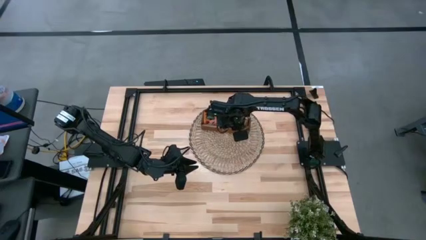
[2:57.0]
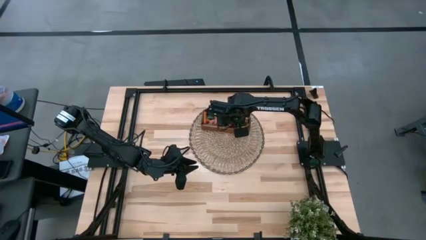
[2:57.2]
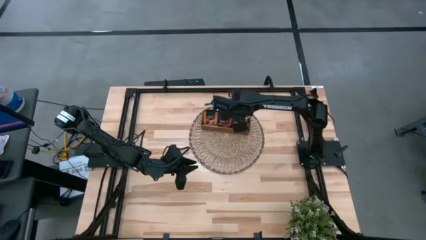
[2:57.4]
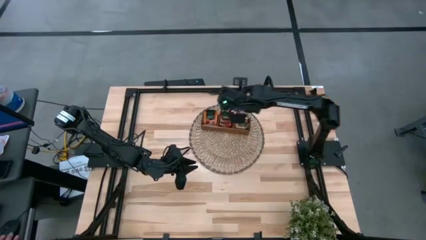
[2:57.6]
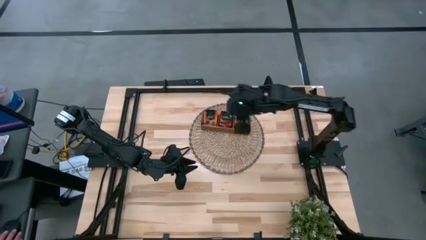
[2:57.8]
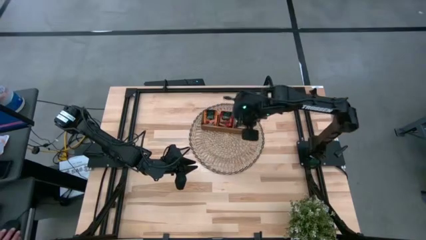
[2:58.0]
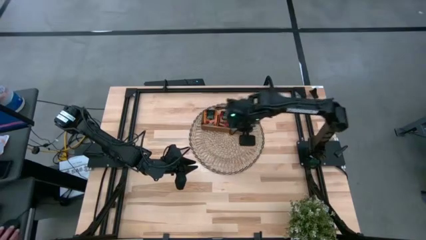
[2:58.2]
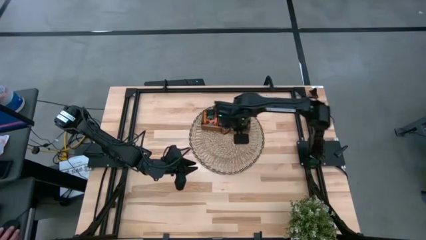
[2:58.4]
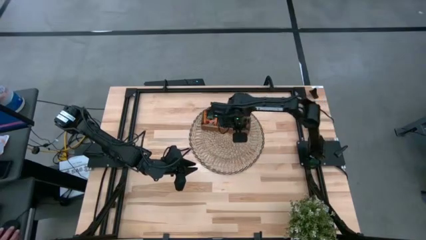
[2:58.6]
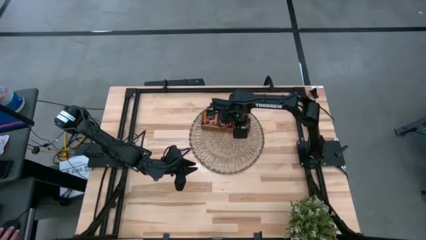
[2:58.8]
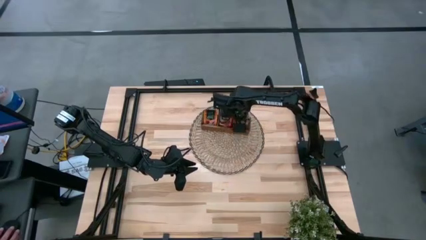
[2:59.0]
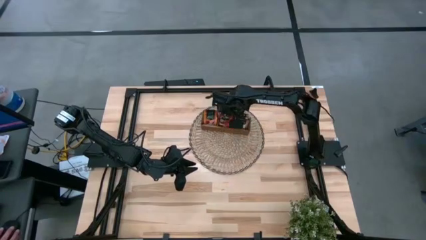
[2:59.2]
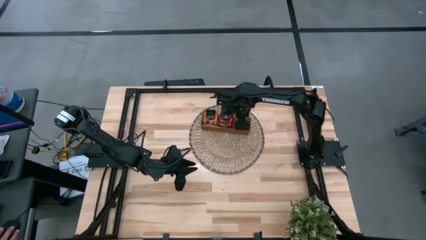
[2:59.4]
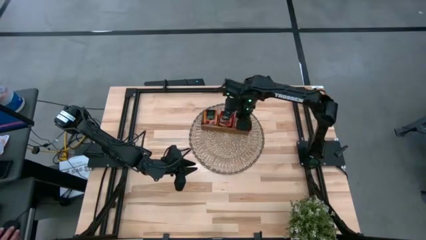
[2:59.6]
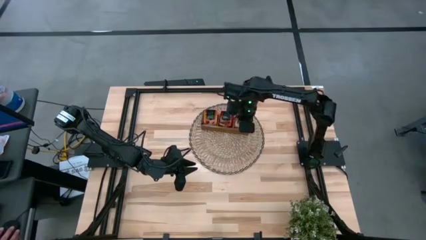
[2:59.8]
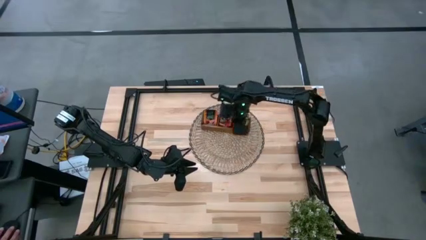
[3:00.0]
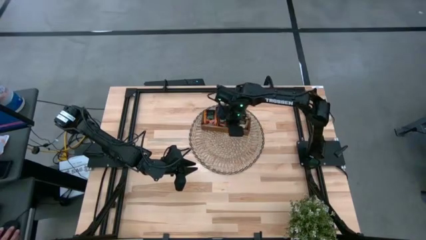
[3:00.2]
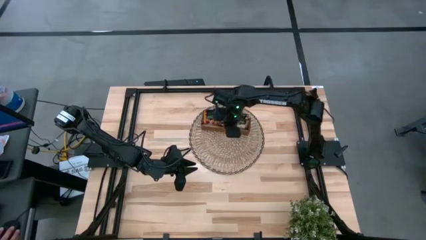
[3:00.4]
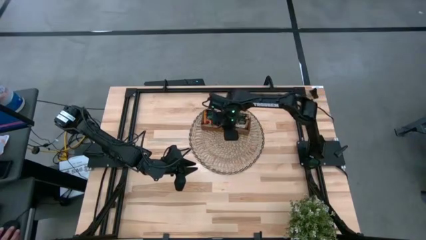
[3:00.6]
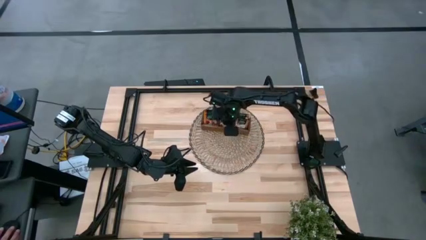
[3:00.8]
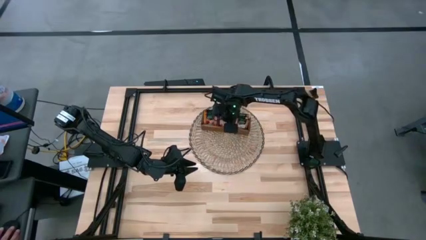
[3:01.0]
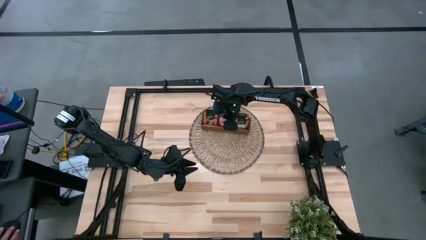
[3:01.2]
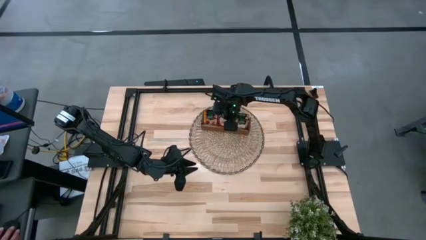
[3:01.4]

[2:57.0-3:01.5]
Task: Pick & Place Tea
Adjust the tea bags

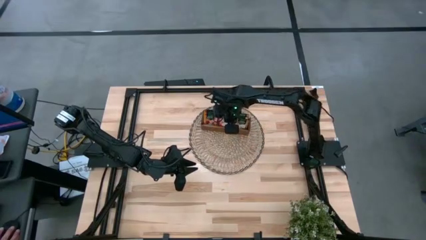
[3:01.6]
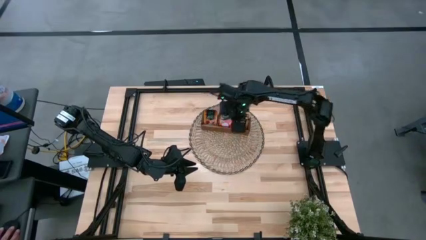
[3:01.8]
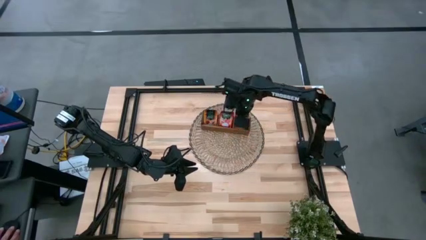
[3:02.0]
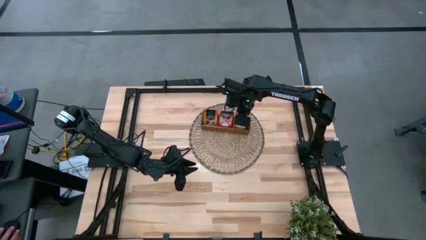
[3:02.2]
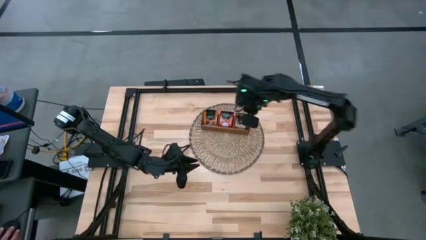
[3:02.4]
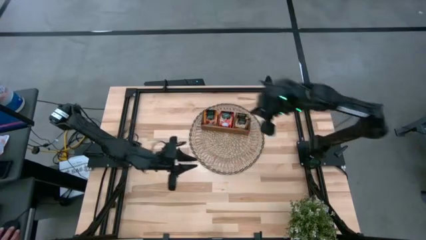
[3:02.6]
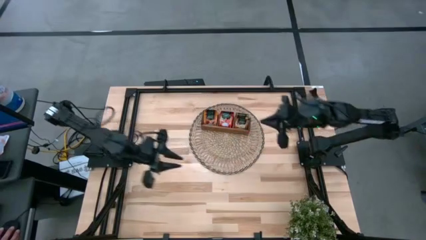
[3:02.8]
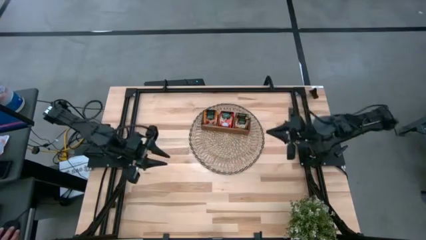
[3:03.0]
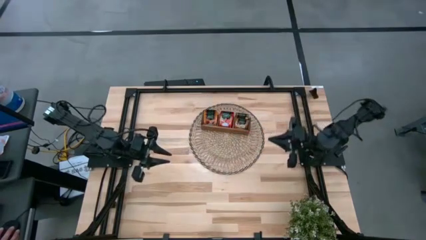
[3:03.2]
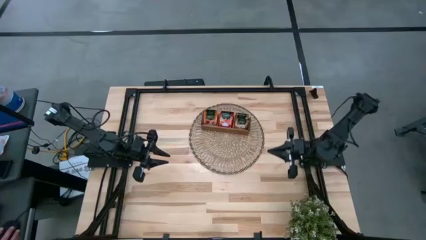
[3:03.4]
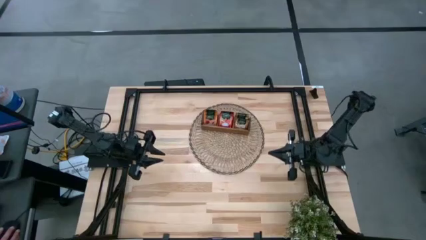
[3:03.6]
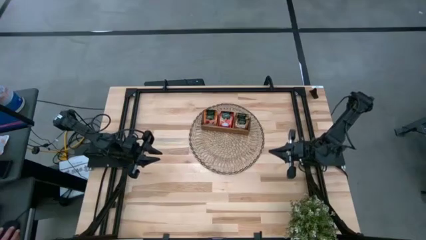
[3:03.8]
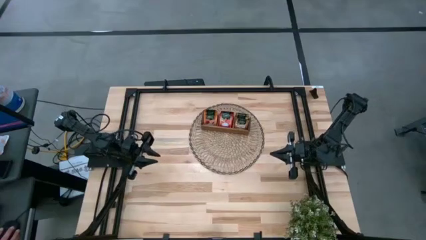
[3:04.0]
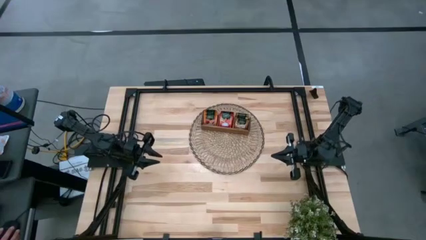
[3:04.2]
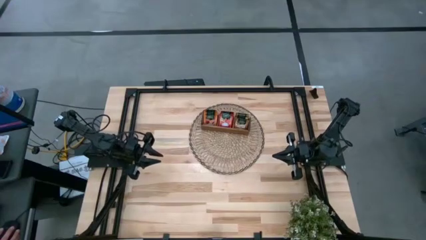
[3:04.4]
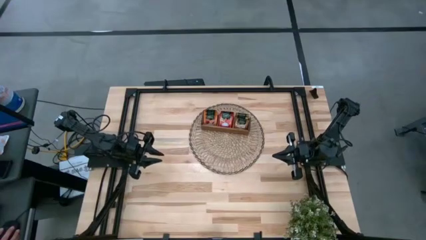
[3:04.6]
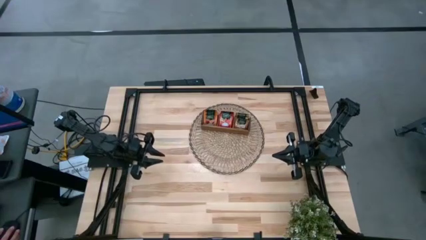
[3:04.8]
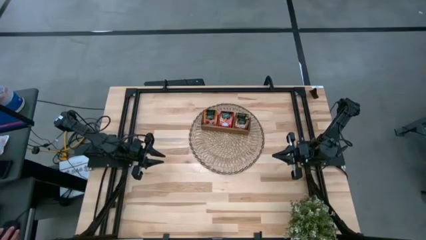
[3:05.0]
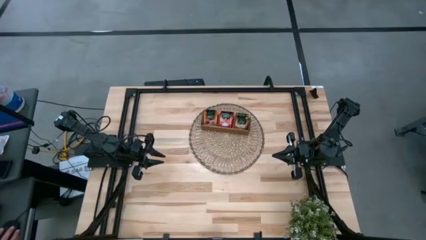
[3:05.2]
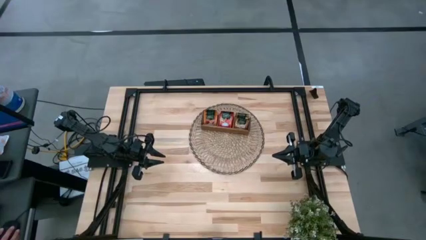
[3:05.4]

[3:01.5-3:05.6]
Return to Home Position

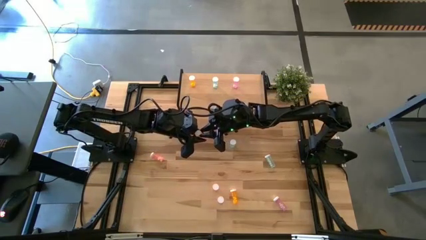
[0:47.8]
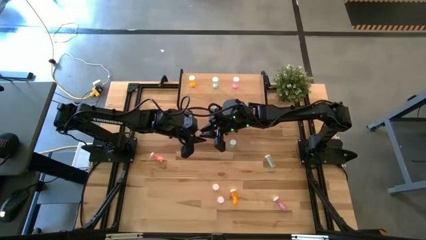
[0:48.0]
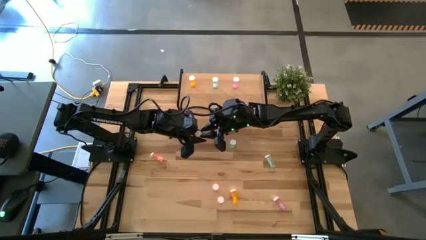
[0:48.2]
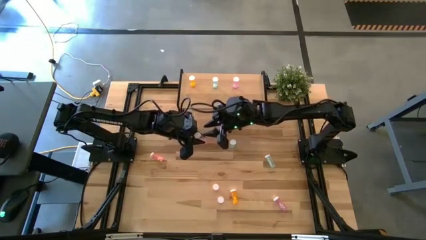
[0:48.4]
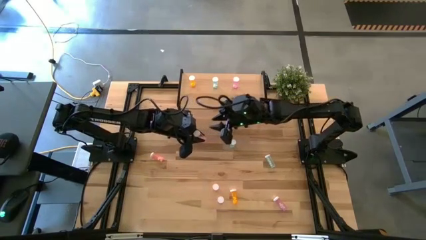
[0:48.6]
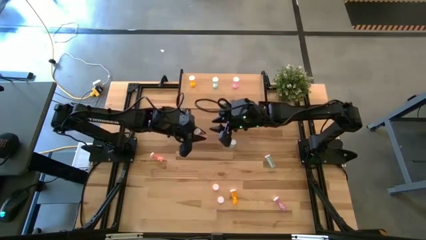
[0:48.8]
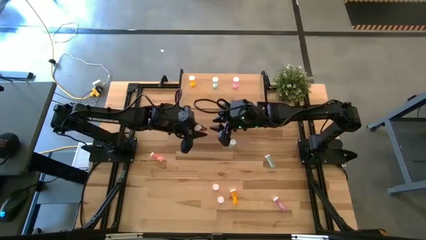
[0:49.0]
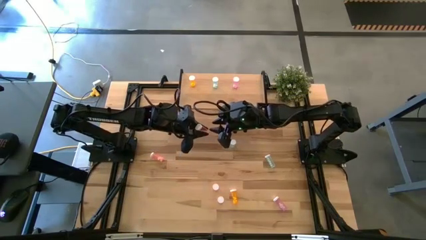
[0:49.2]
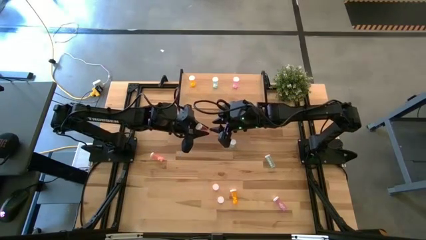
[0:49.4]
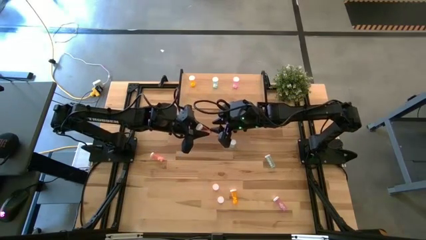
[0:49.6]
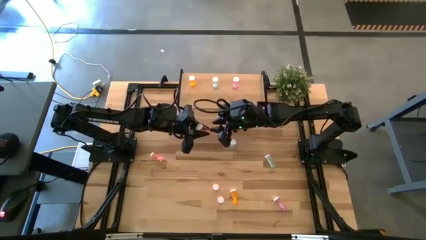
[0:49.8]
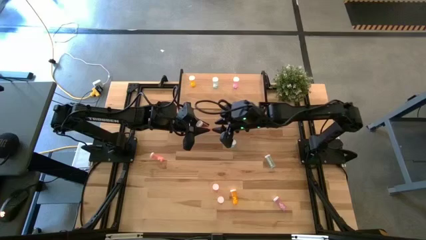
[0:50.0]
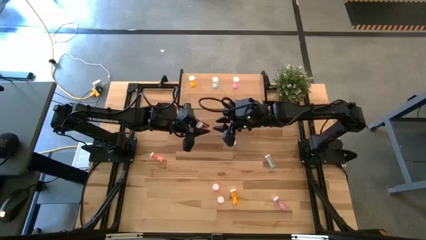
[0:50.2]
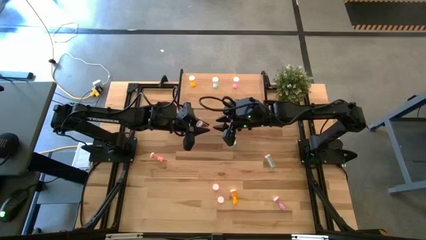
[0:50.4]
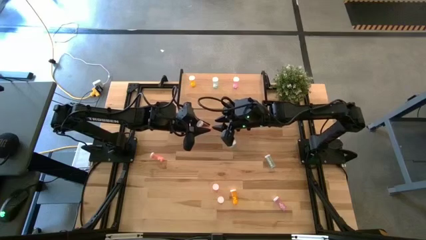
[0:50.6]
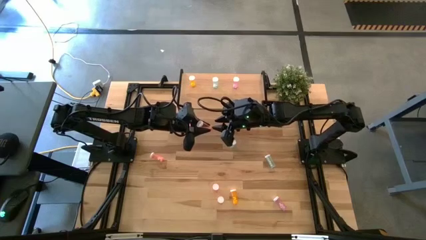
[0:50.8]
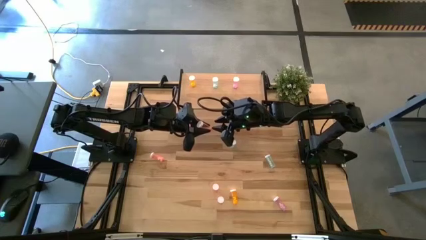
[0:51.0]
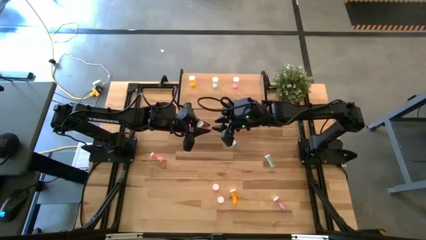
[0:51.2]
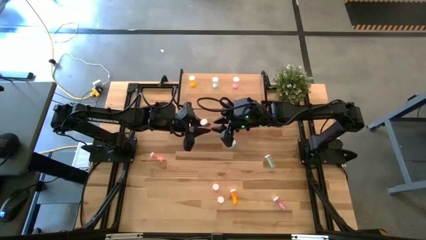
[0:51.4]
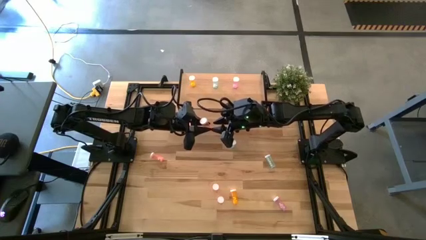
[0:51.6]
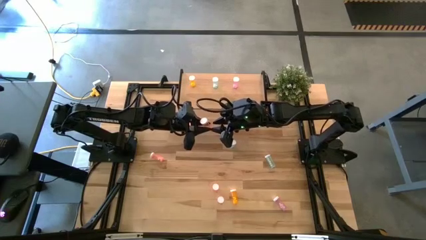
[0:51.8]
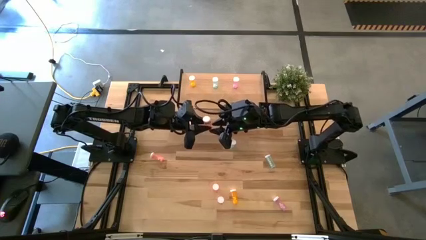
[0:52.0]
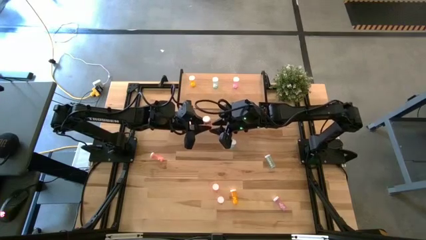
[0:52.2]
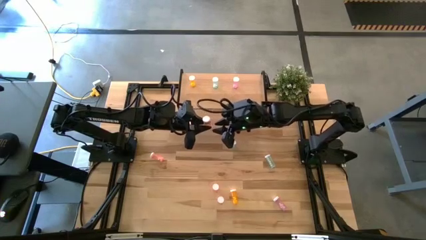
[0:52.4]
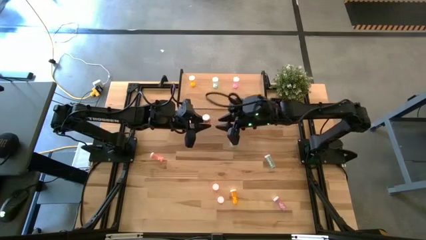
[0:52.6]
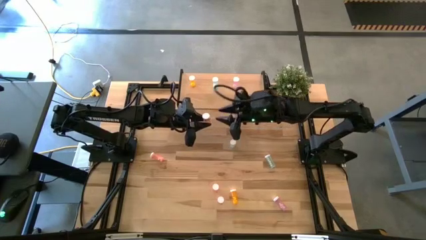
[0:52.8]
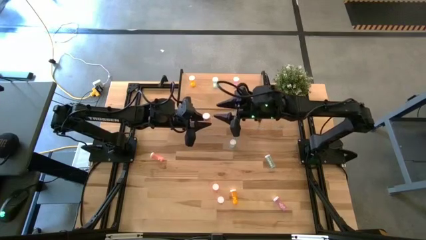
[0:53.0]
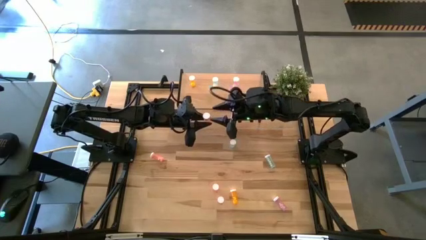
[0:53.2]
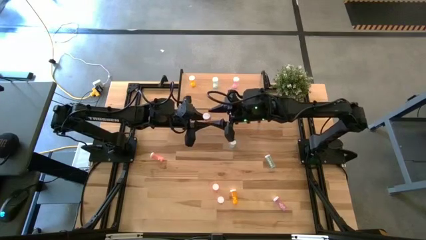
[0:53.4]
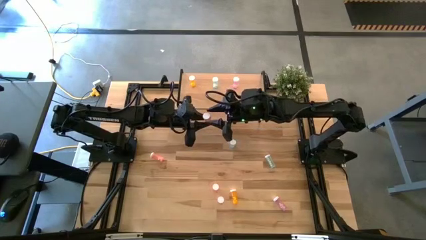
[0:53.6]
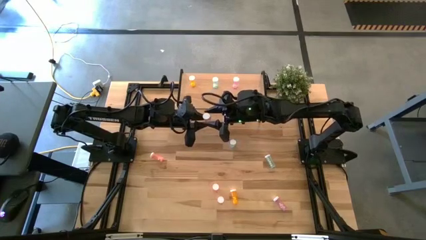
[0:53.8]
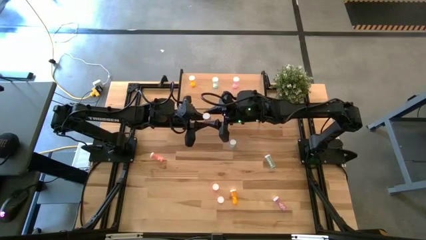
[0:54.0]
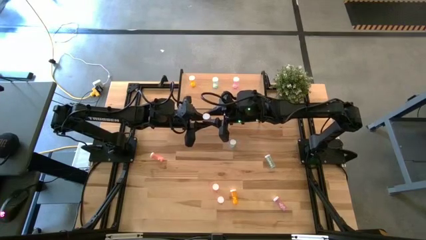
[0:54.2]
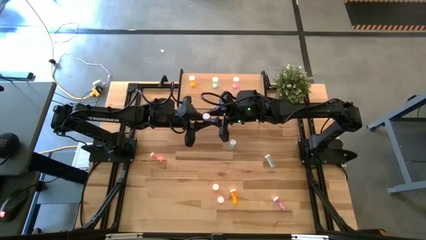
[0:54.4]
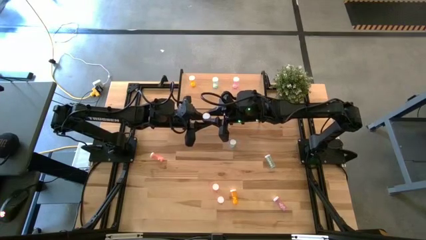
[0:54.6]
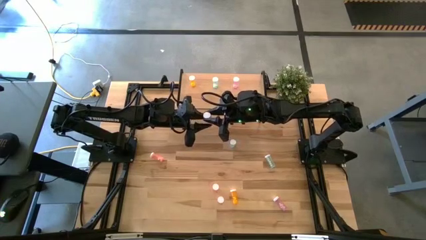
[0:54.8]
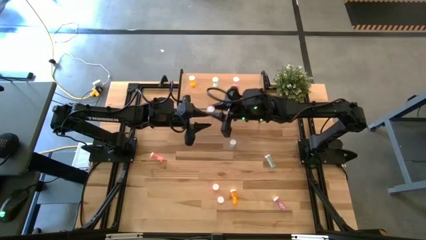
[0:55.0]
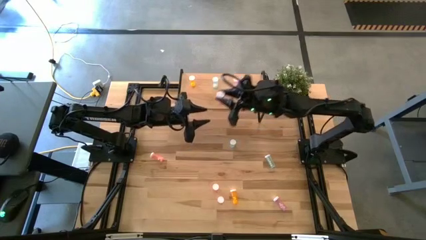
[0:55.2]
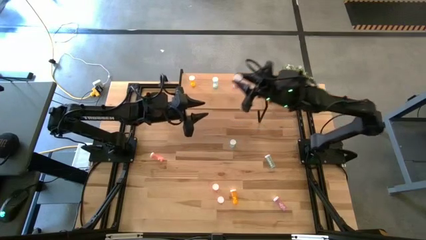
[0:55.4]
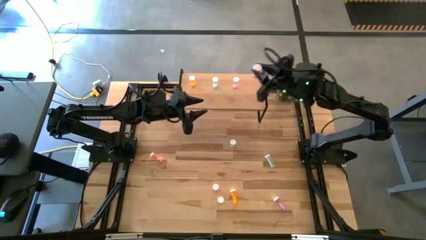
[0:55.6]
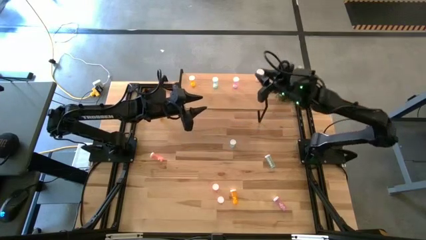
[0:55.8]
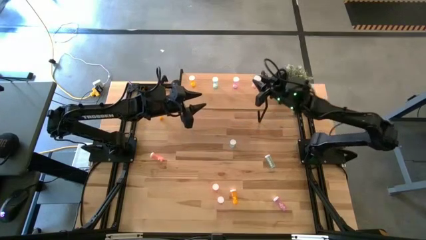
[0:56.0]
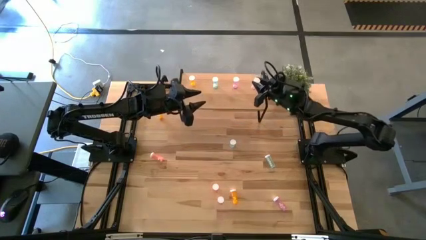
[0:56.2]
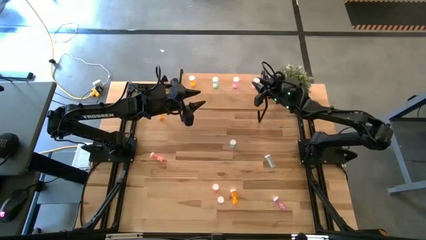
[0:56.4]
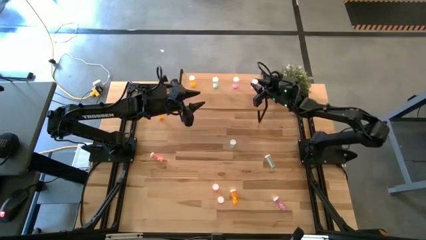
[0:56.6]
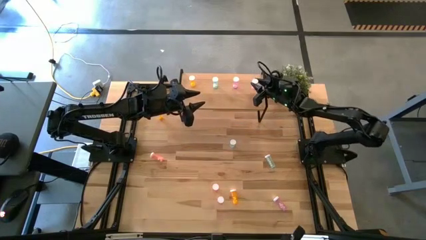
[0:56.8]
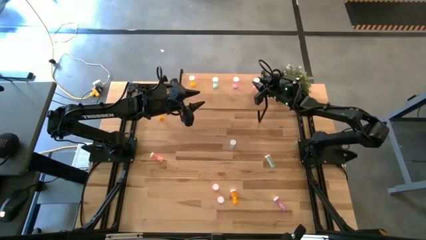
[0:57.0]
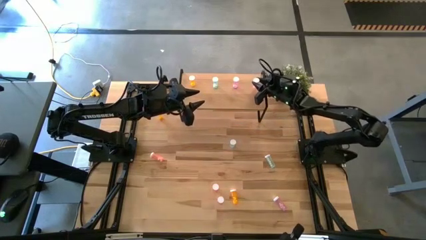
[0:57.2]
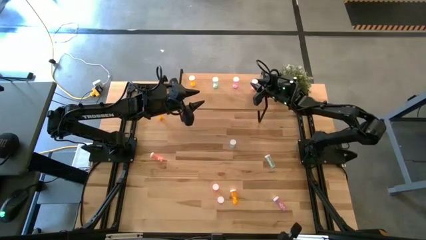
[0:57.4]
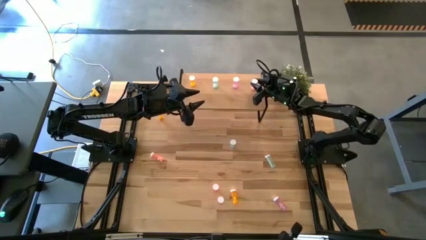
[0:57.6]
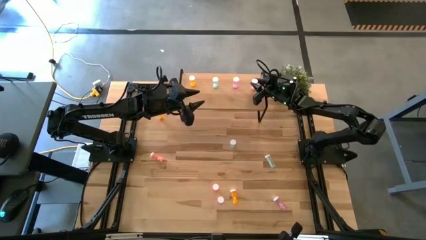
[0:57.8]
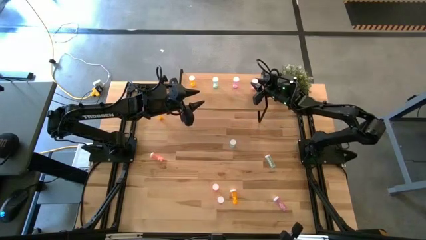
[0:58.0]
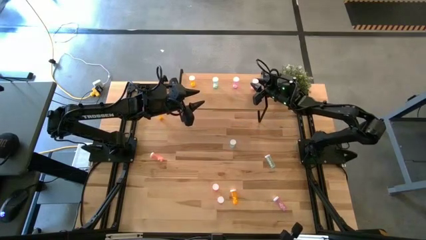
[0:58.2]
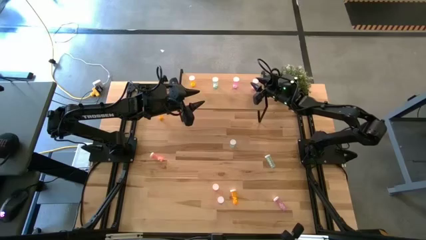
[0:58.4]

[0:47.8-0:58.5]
Task: Pick and place medicine bottles onto shelf by color
Put the bottom left pink pill bottle on the shelf
